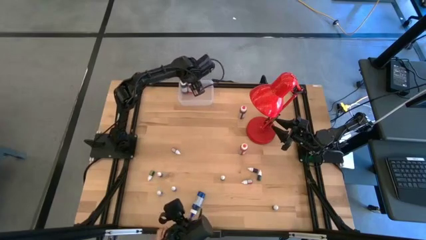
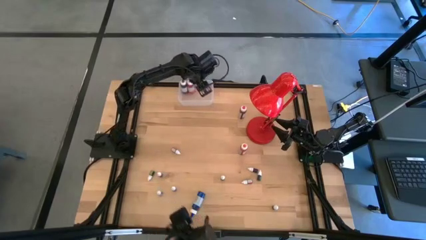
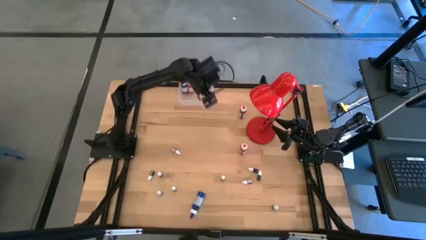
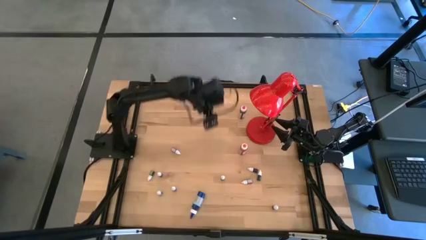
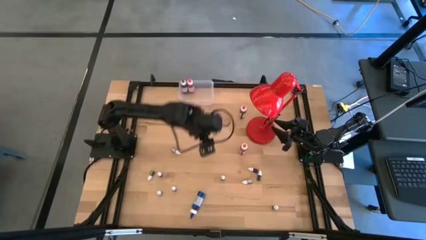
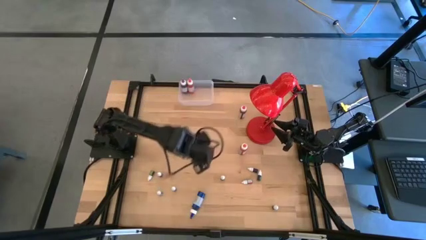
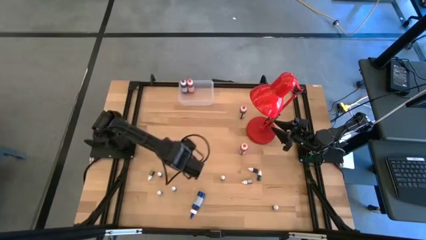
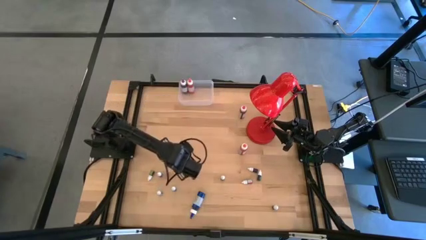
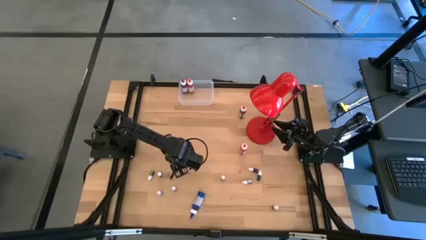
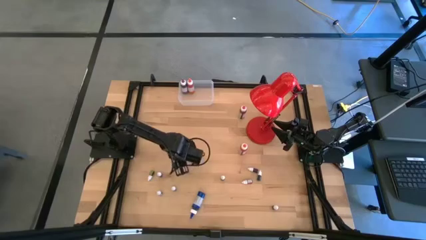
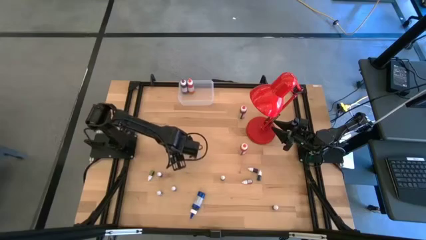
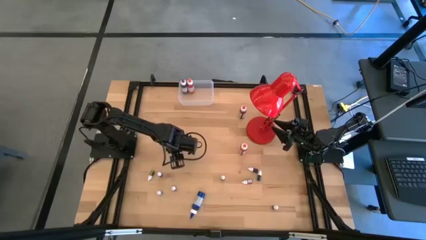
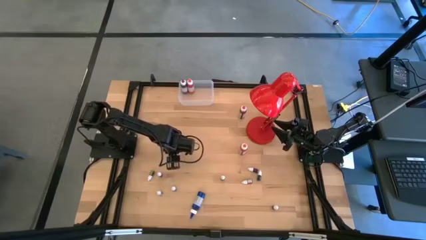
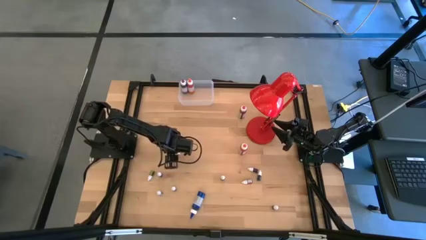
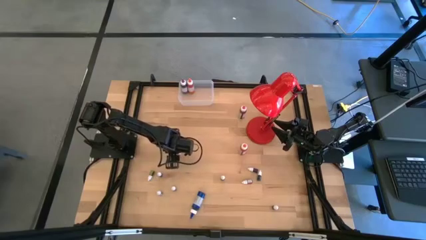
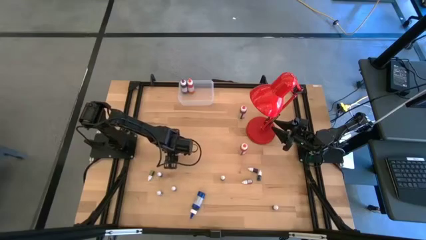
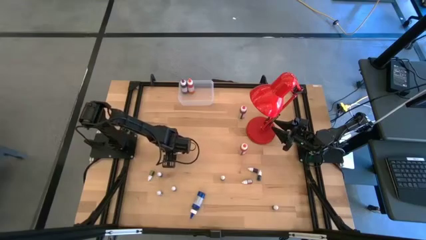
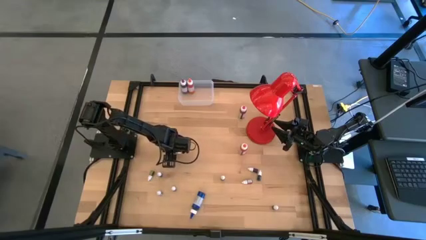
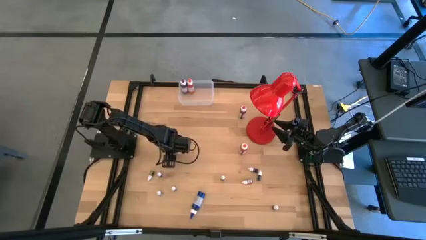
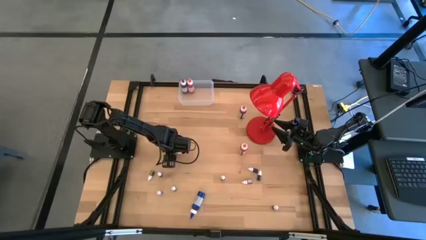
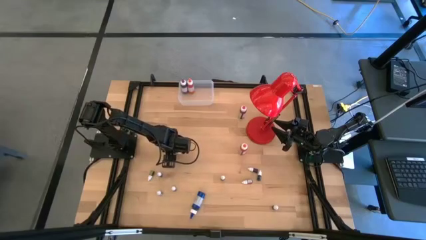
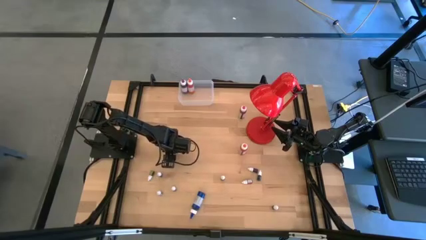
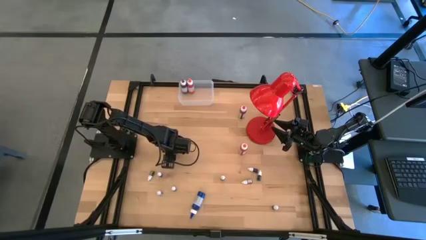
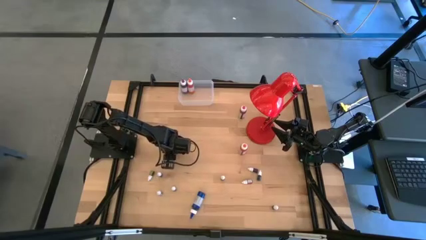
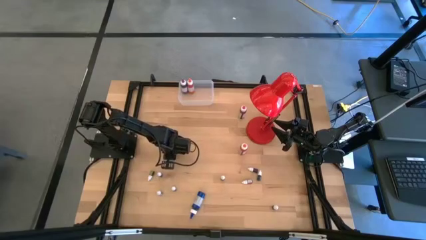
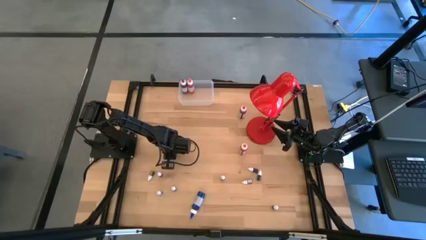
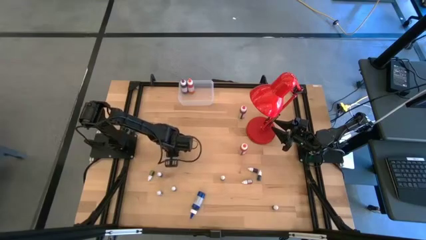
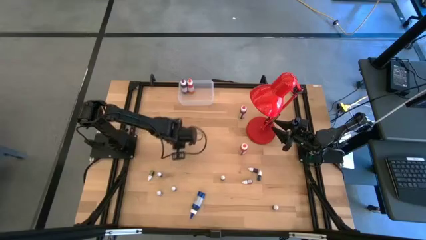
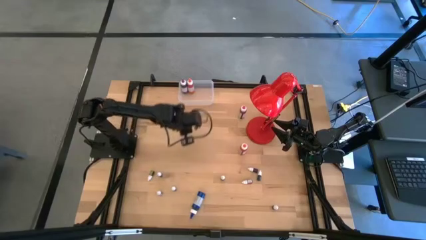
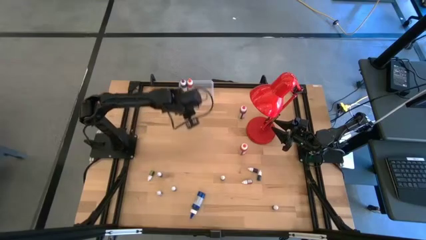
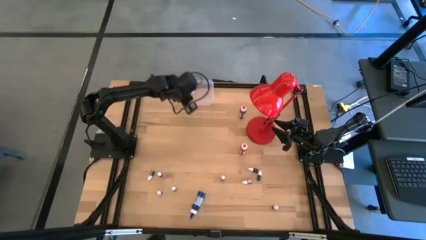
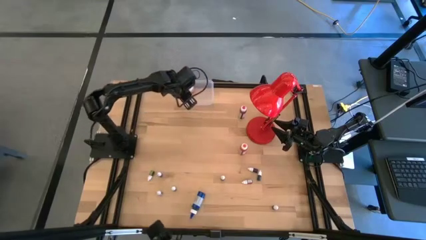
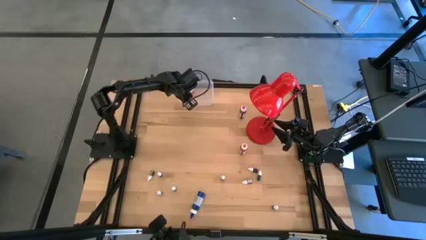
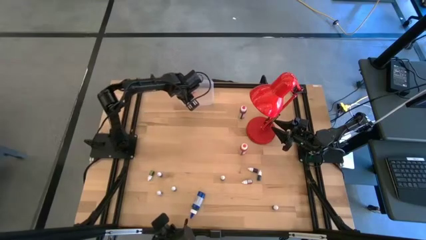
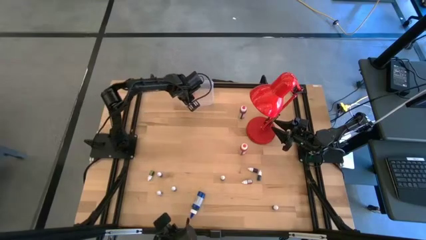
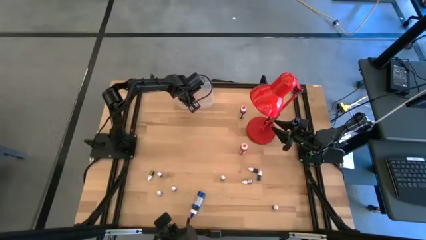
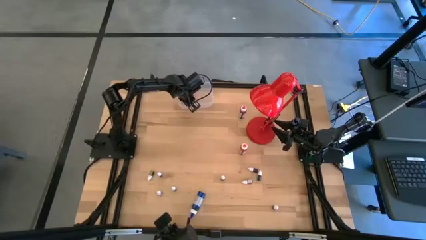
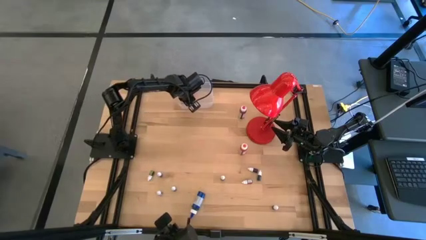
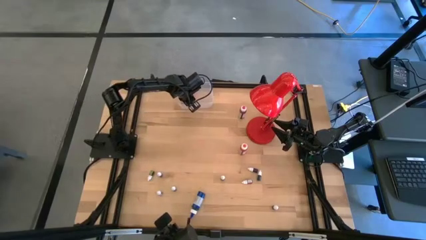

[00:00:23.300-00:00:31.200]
Task: Pick & Place food coloring
Put the top small pink food coloring bottle into the transparent bin

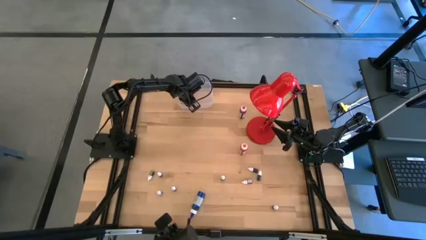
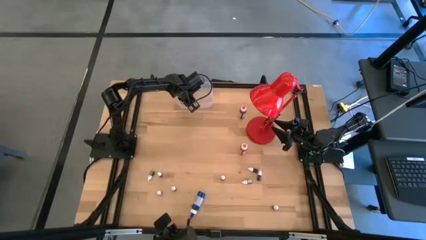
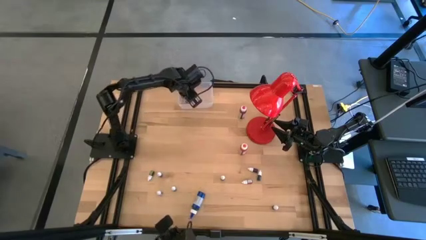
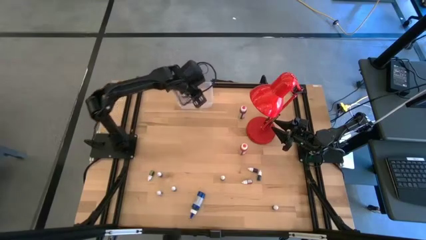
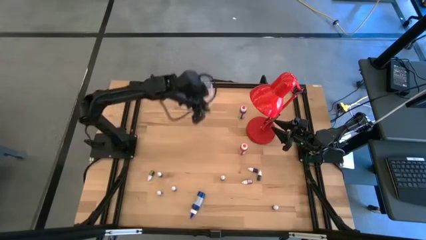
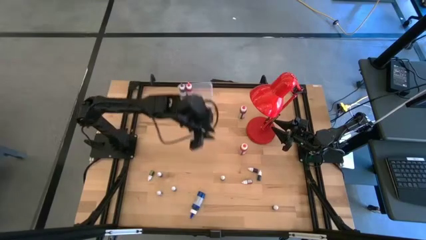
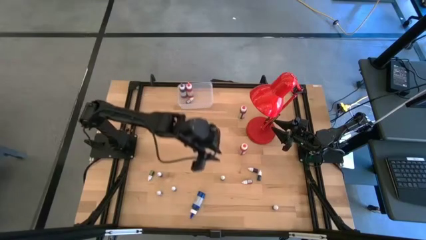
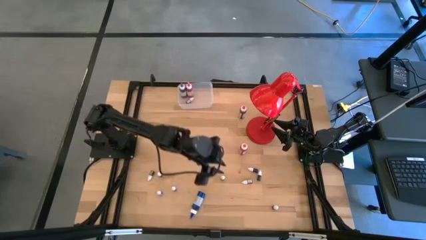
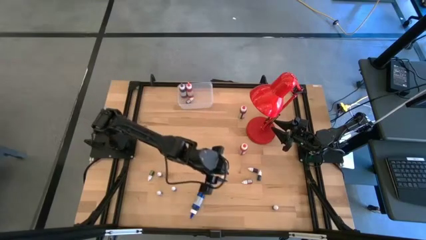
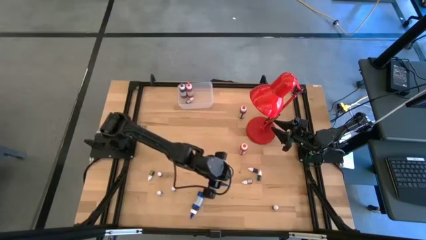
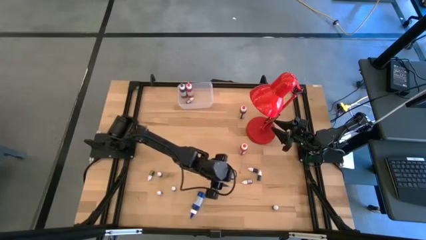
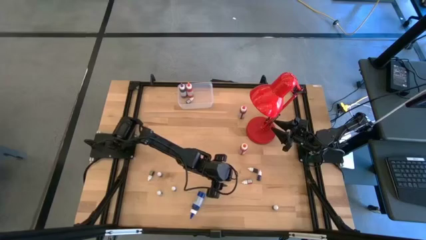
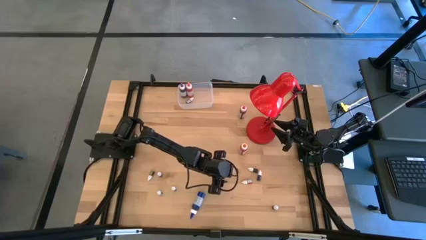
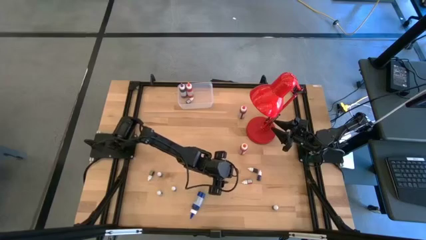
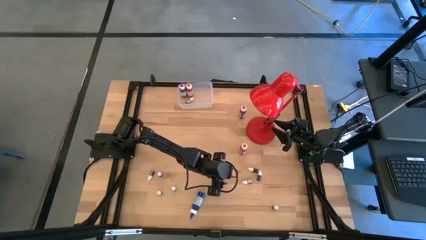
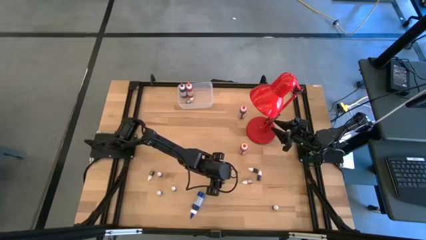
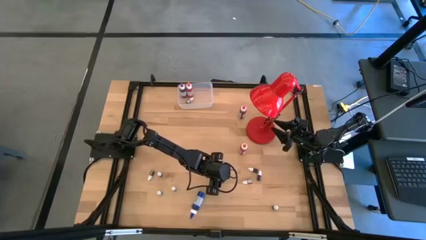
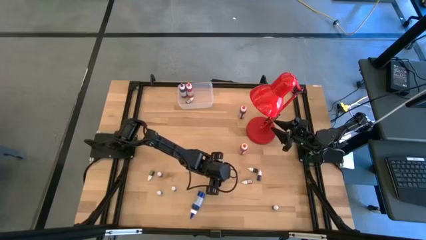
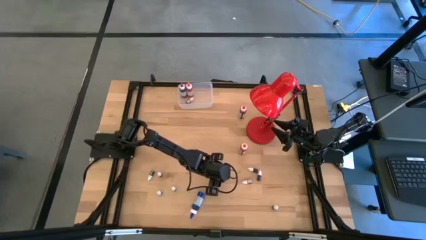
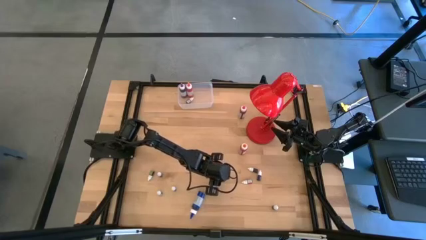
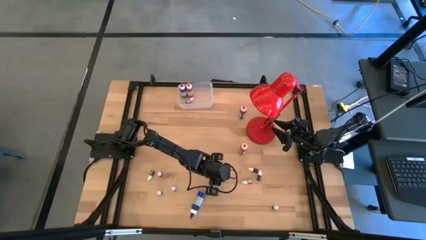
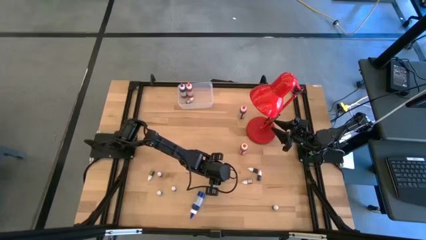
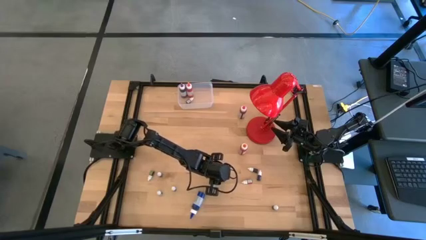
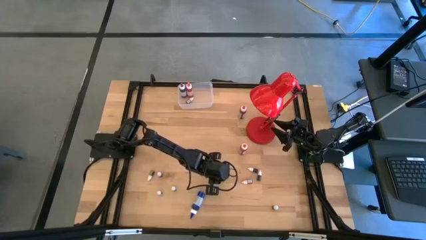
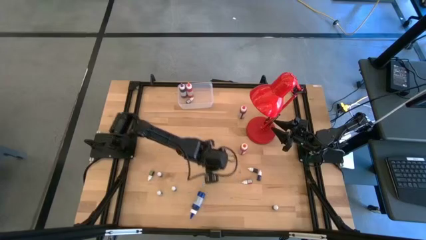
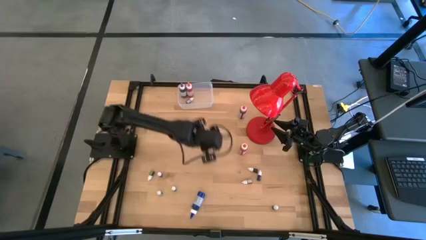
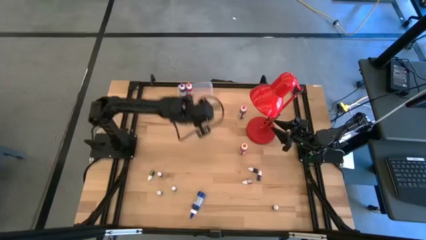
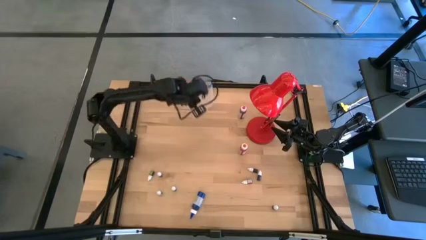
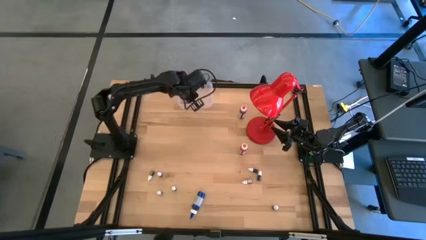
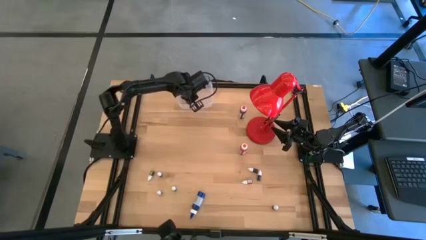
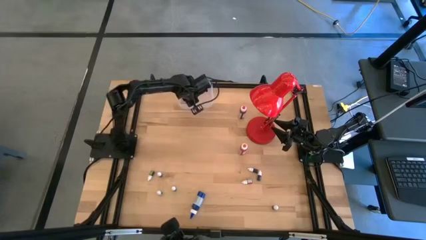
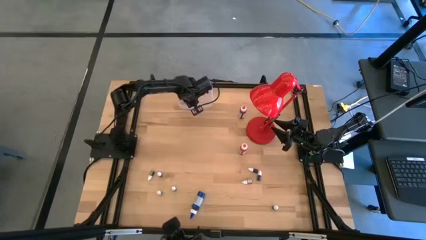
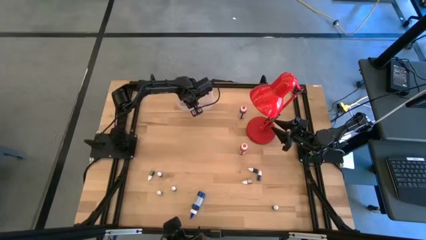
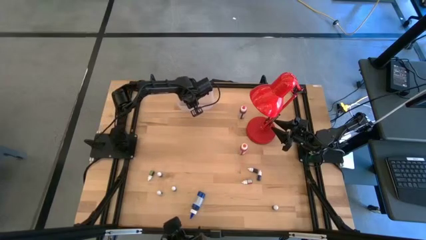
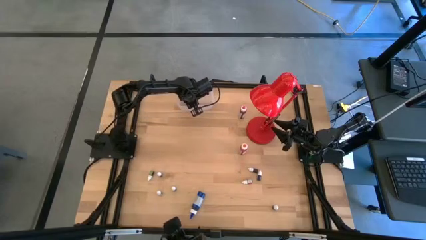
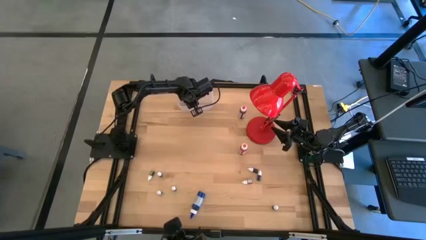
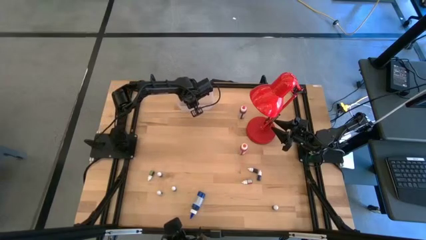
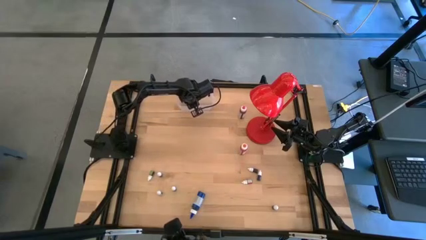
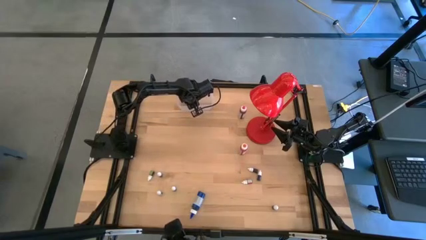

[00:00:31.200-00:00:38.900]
Put the small blue food coloring bottle into the transparent bin
